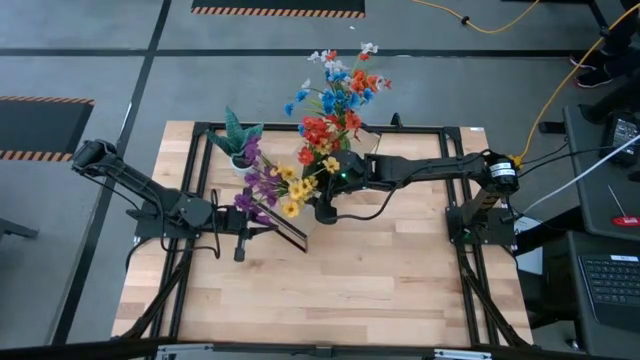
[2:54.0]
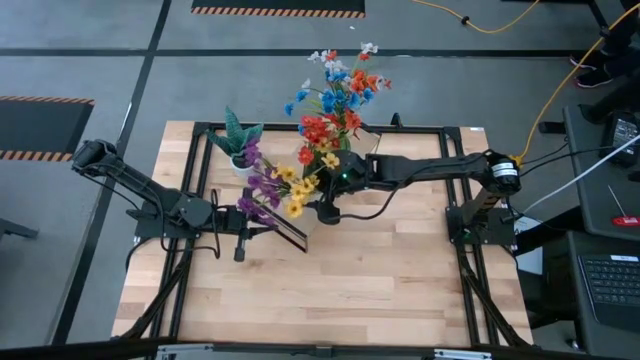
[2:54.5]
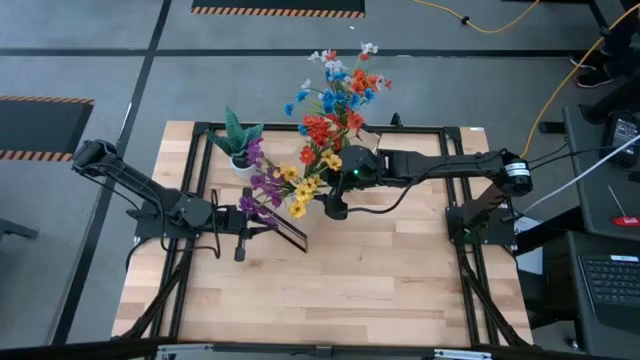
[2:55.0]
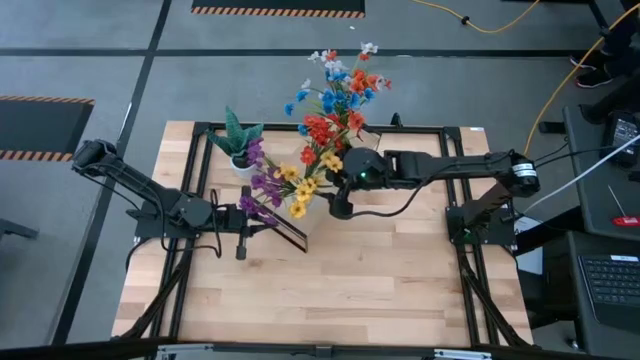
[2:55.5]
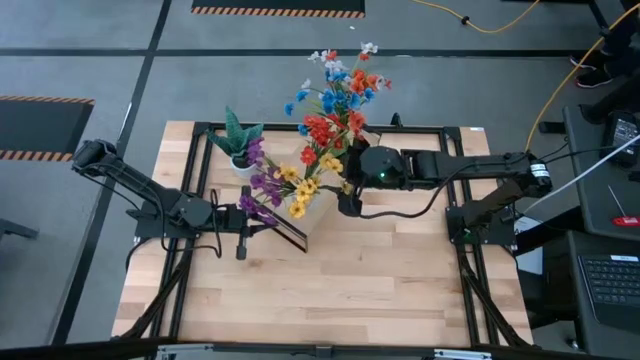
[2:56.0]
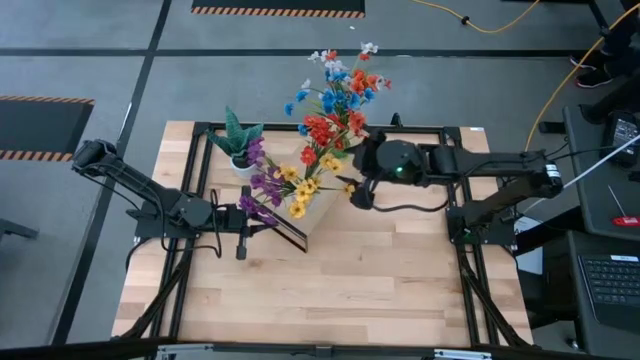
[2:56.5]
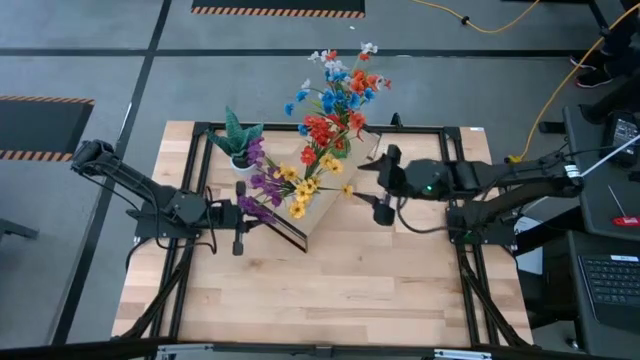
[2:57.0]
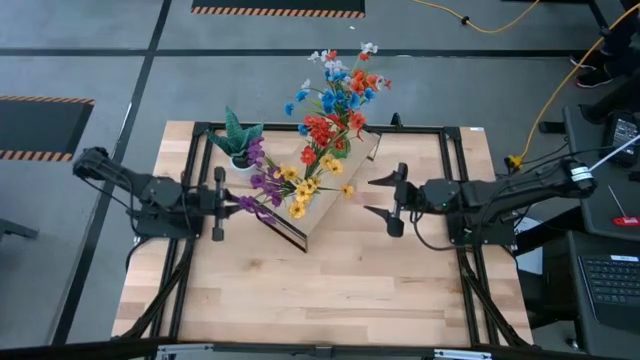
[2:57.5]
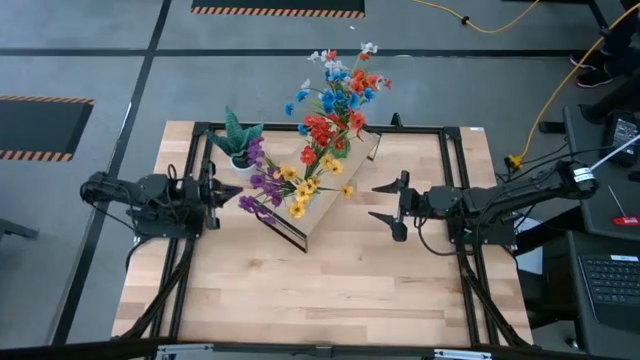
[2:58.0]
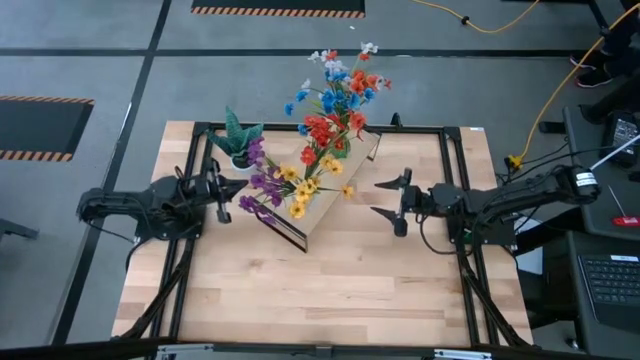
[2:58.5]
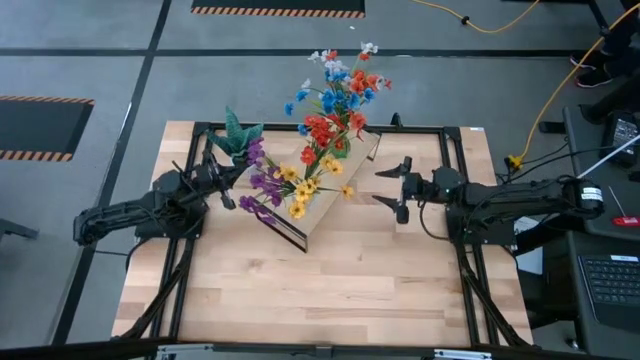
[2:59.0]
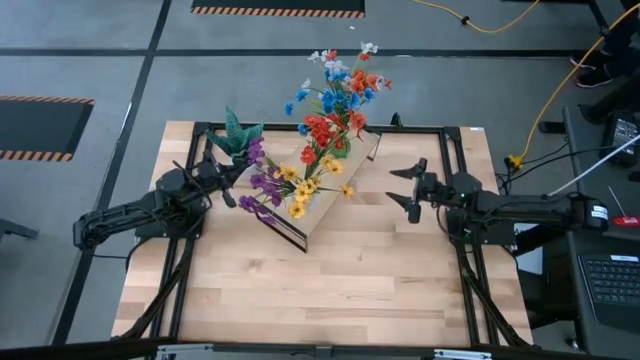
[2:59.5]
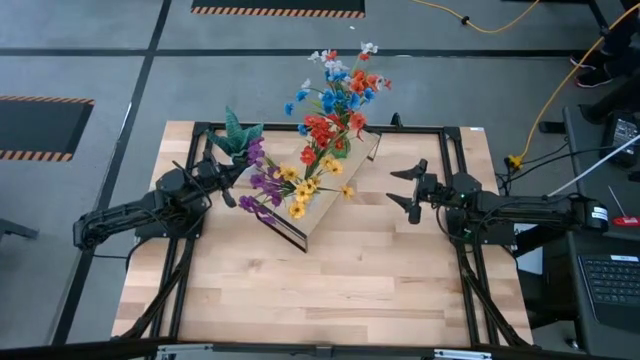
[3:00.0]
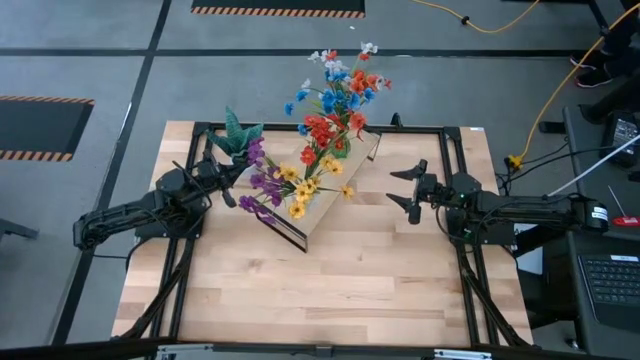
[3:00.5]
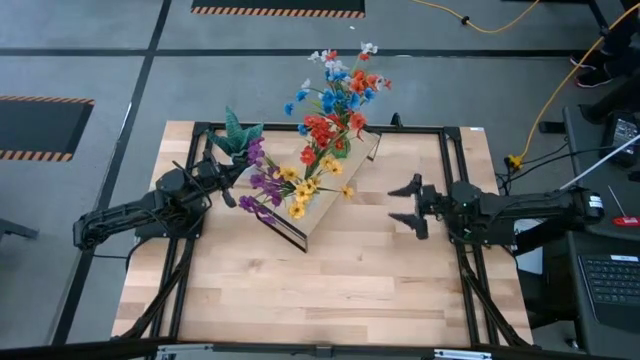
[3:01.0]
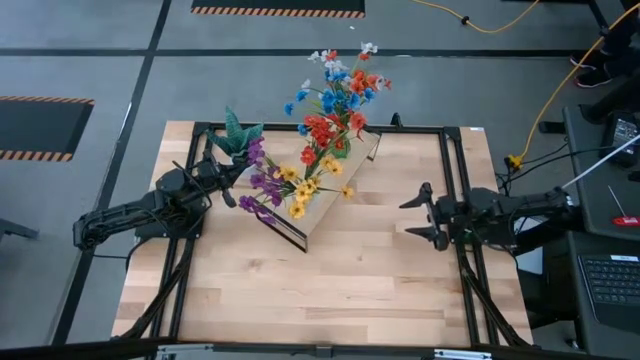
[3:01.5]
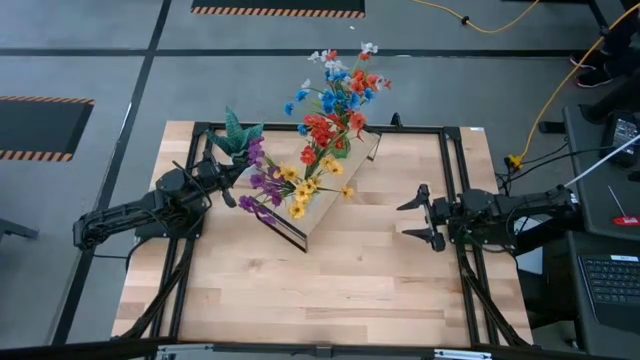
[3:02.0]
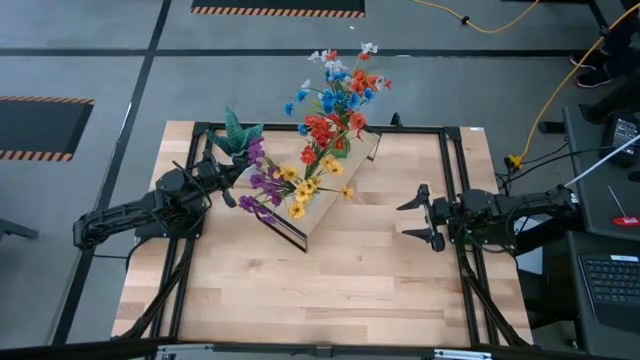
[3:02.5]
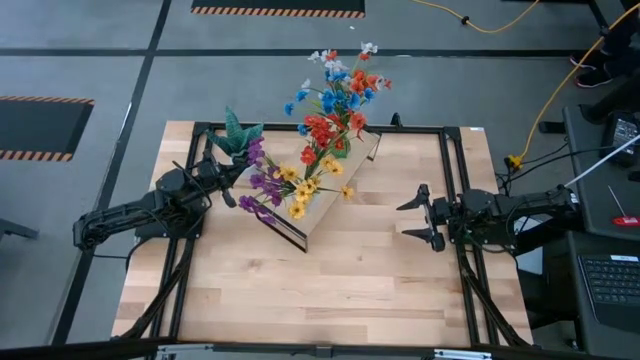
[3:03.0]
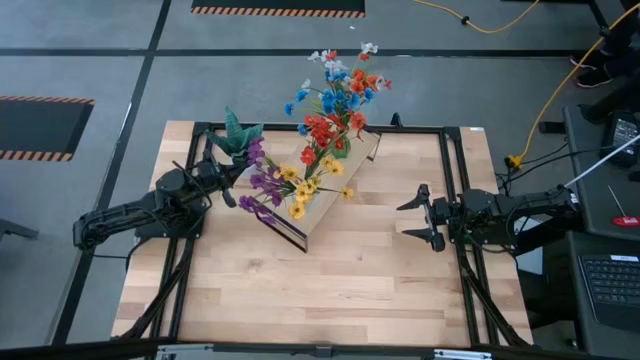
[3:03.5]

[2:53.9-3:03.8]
Task: Pick and place flowers into a vace then onto a shelf
Return to Home Position

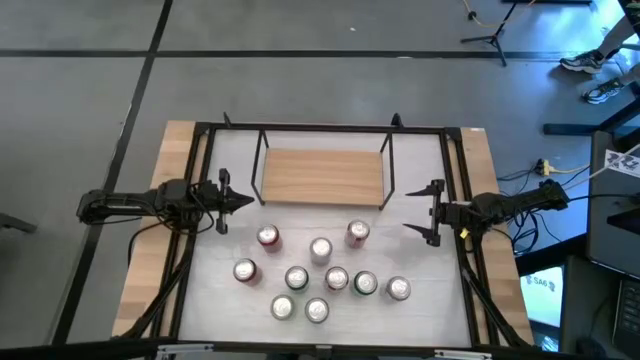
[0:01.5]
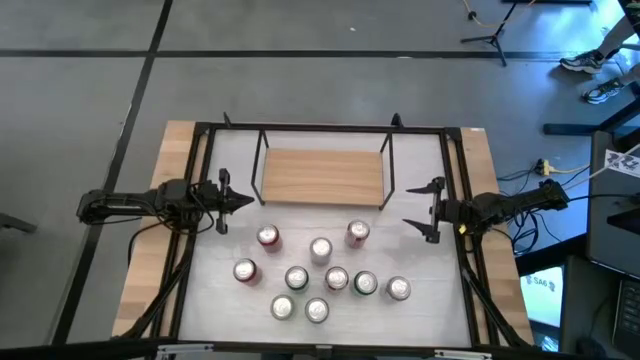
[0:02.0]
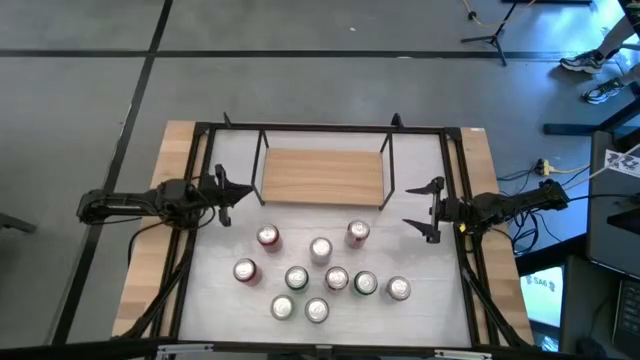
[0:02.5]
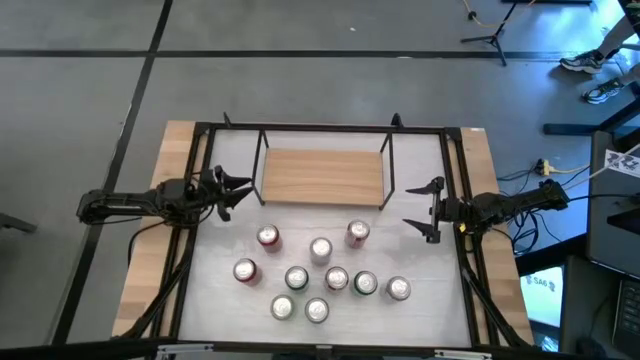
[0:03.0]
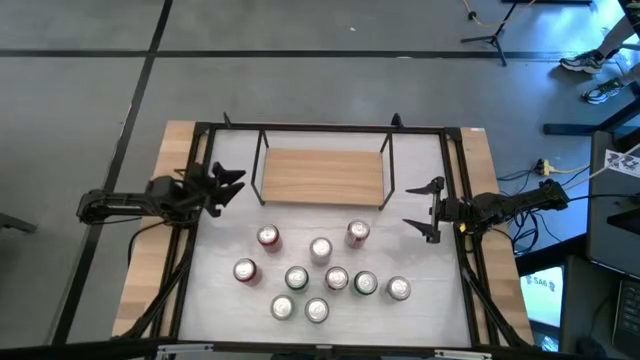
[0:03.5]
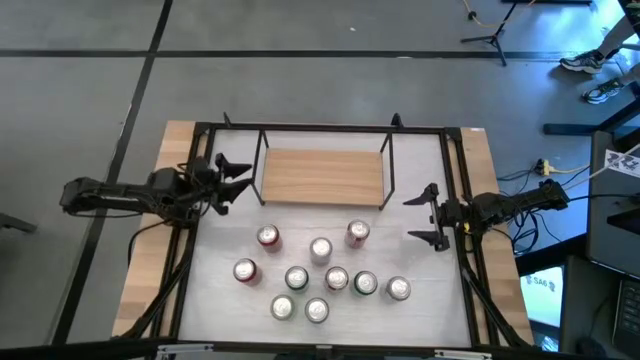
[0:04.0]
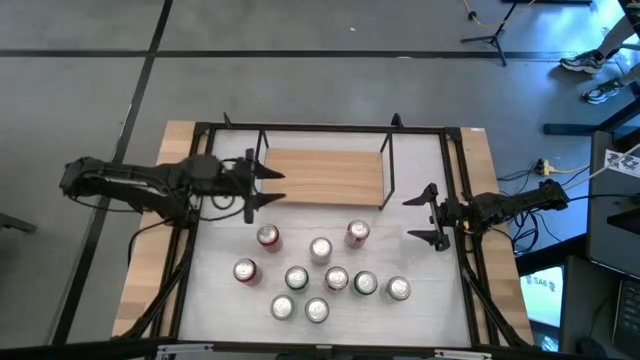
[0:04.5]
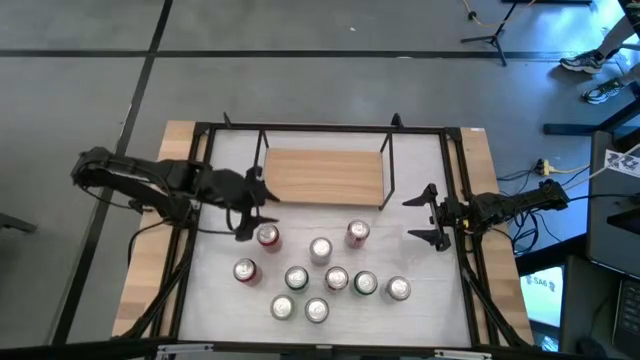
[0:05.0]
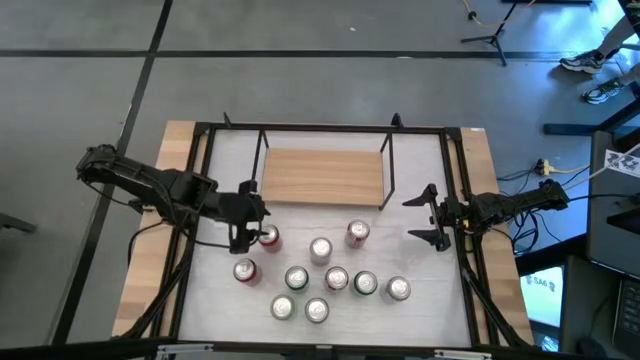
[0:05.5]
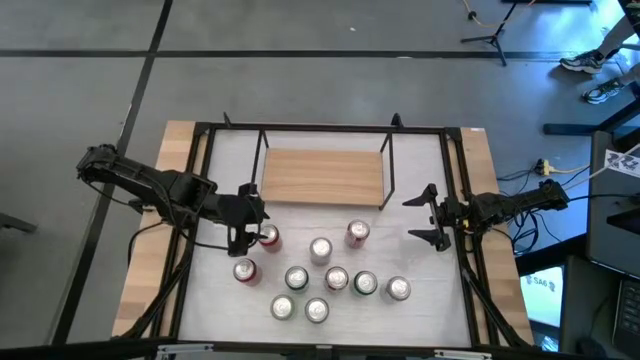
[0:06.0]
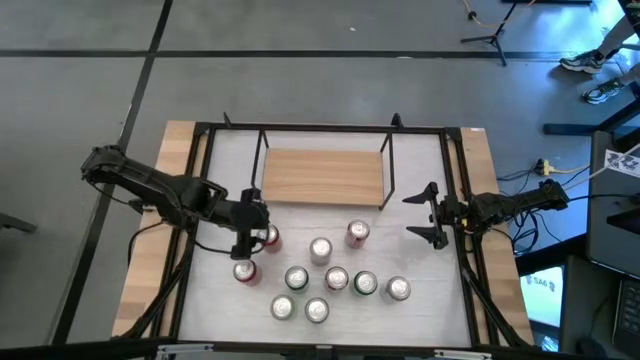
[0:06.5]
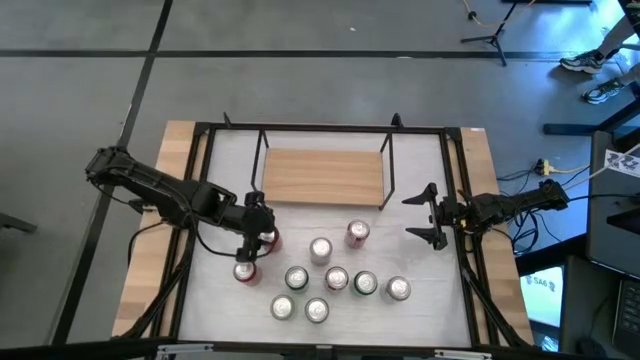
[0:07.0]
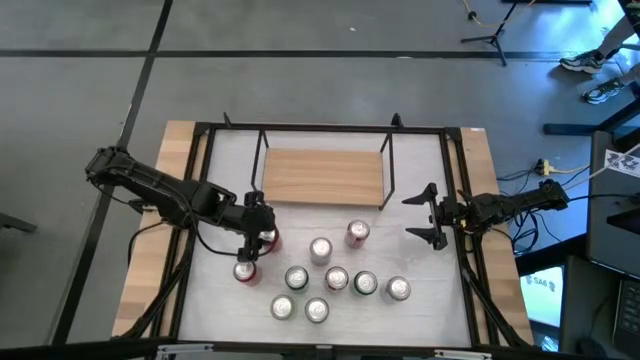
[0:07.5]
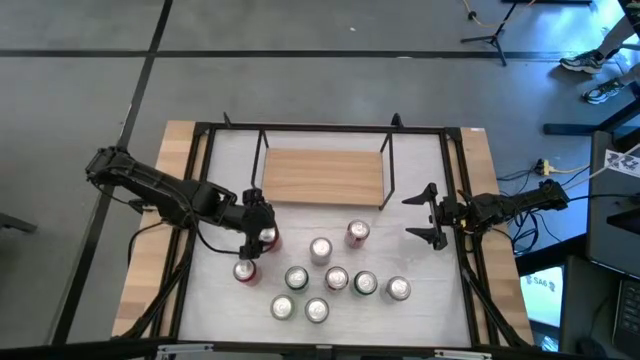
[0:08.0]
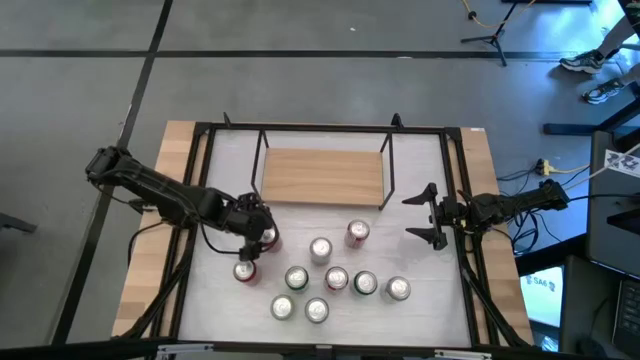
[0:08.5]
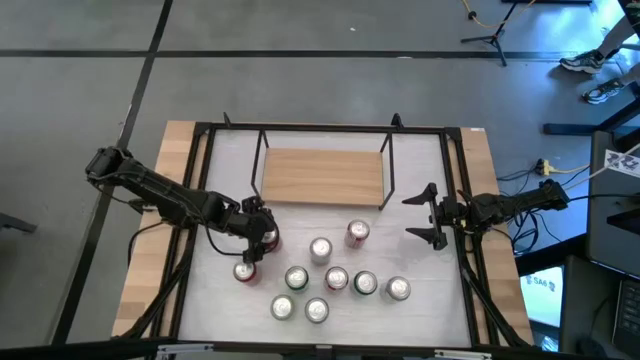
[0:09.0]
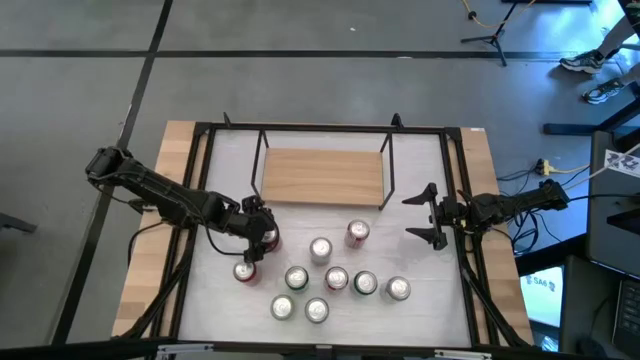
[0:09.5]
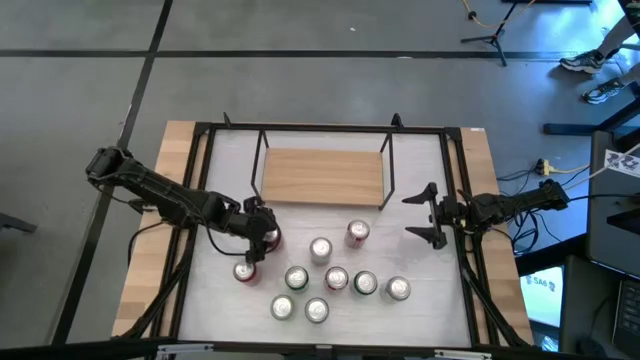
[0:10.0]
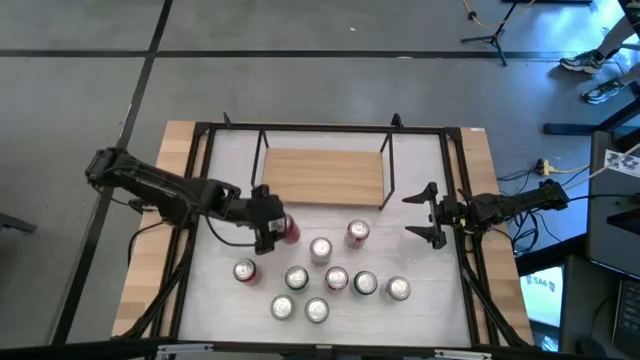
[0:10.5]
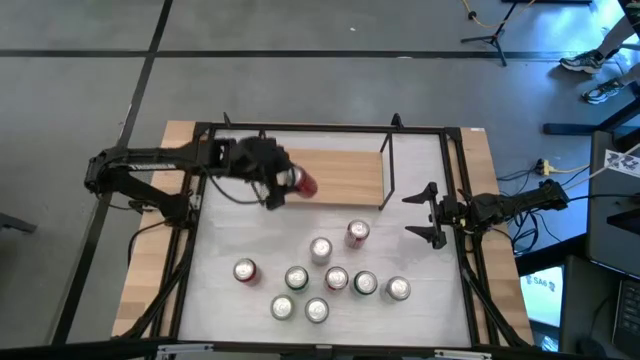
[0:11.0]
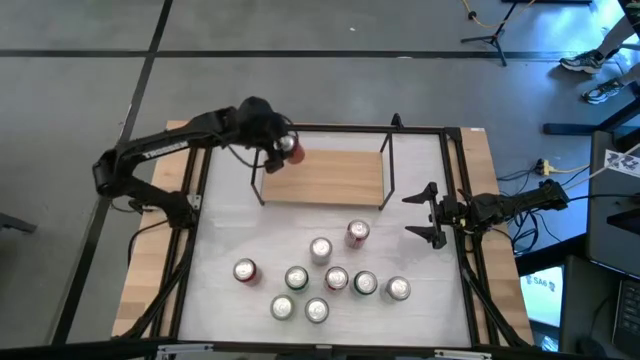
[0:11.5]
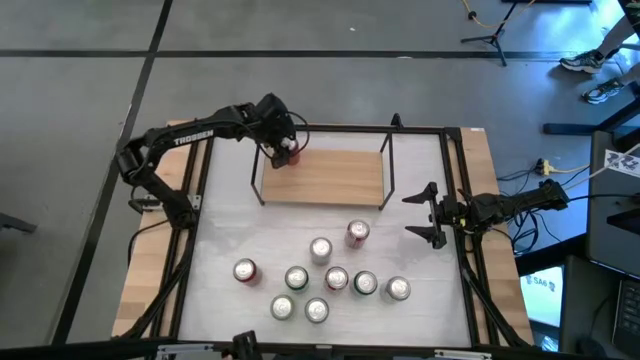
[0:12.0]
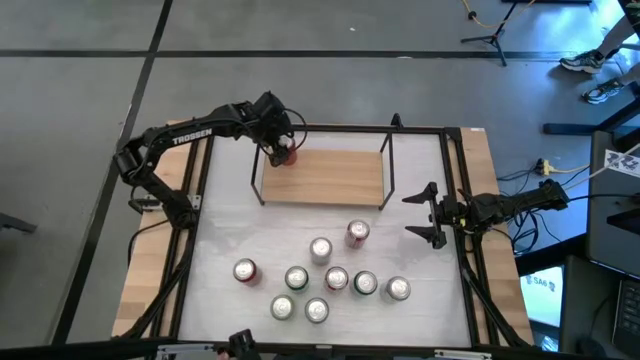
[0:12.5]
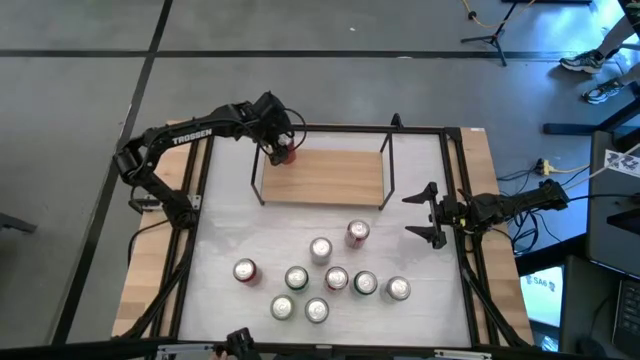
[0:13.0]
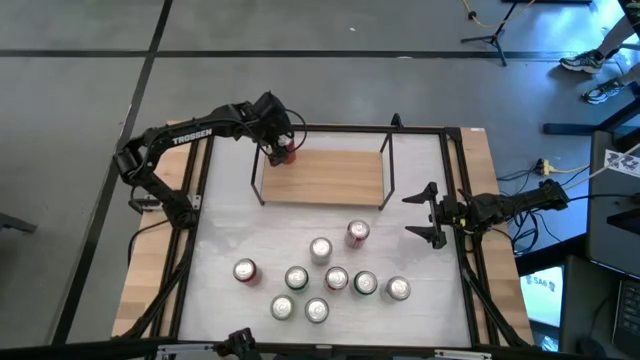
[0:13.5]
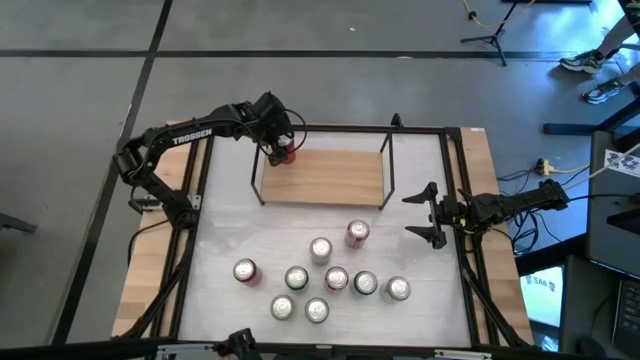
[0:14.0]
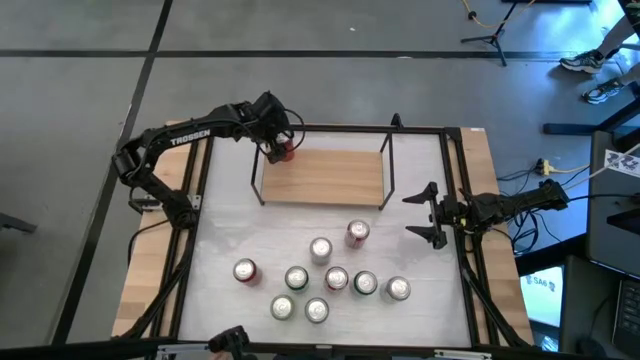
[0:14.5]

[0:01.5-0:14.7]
Task: Place canned beverage on shelf
Put the top red soda can on the shelf
